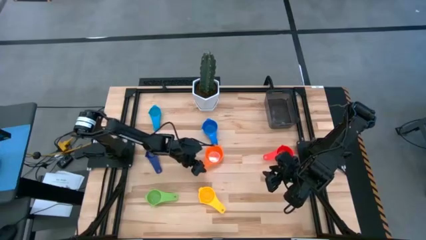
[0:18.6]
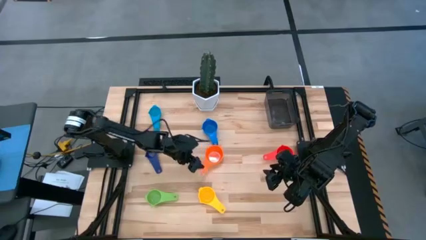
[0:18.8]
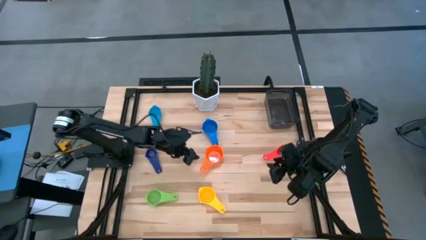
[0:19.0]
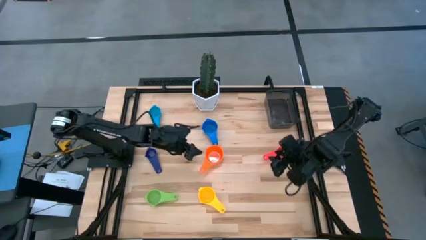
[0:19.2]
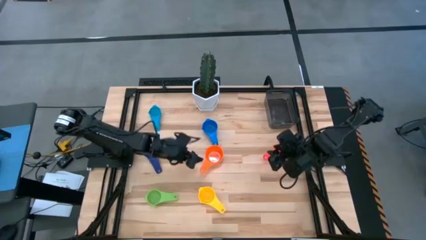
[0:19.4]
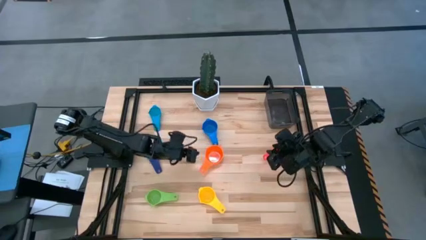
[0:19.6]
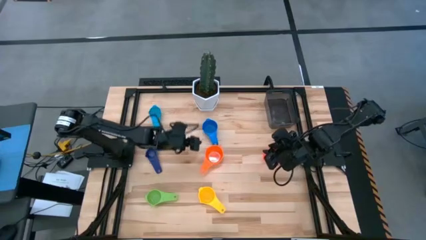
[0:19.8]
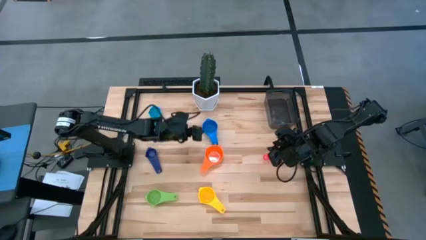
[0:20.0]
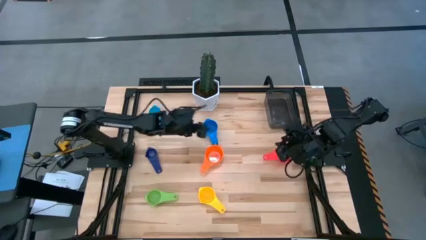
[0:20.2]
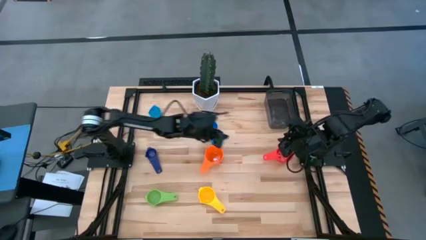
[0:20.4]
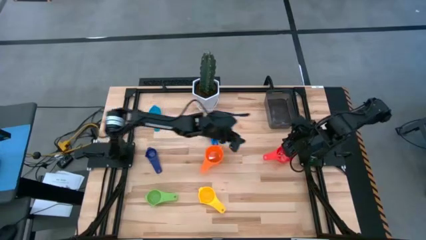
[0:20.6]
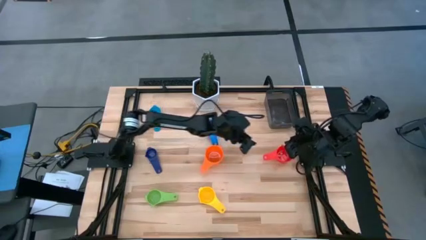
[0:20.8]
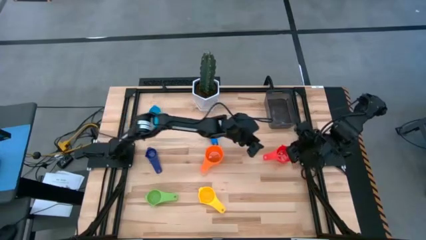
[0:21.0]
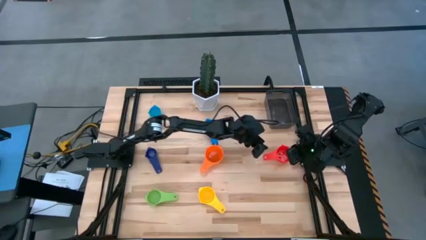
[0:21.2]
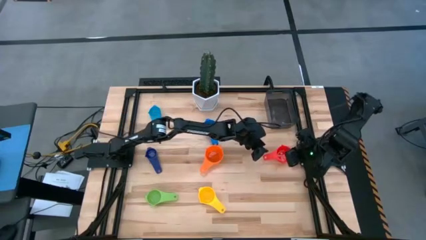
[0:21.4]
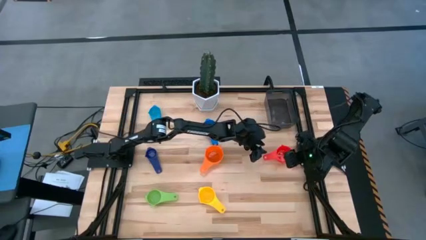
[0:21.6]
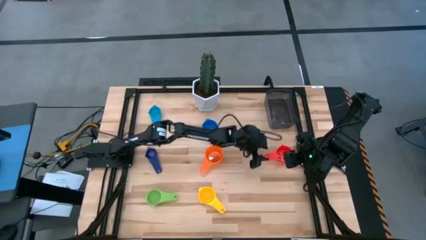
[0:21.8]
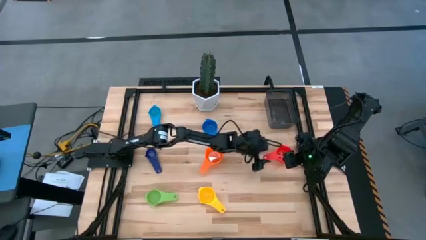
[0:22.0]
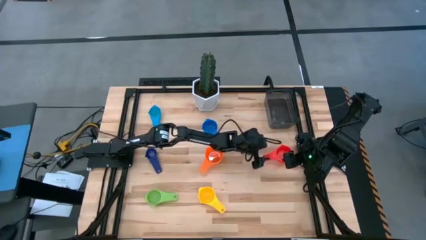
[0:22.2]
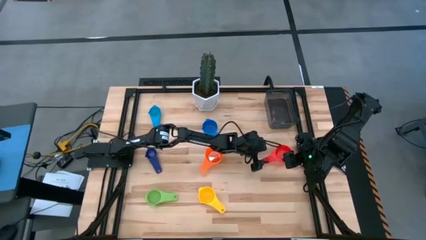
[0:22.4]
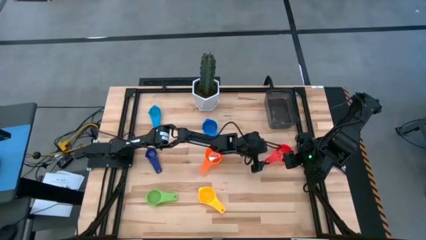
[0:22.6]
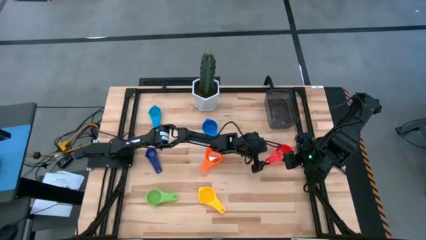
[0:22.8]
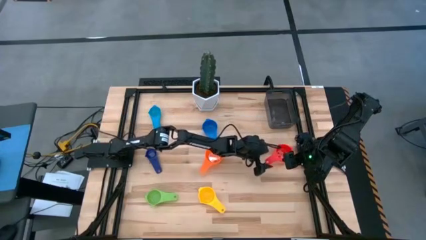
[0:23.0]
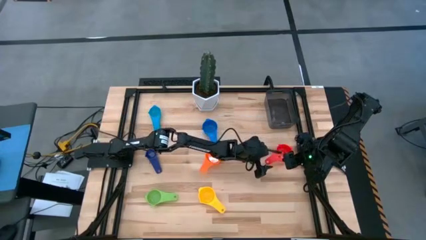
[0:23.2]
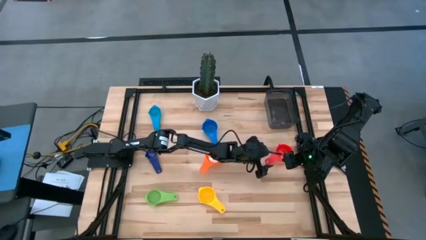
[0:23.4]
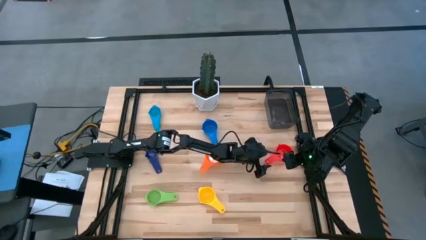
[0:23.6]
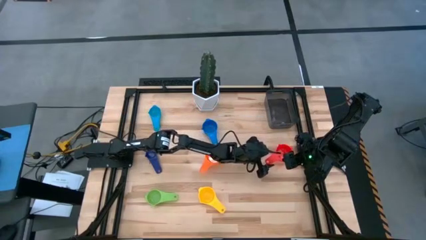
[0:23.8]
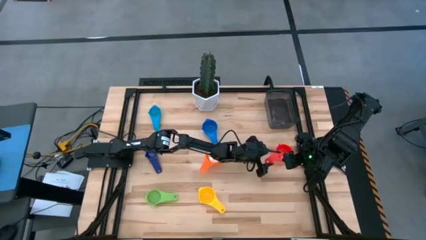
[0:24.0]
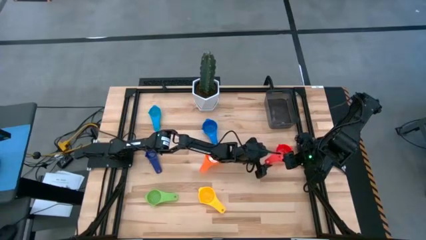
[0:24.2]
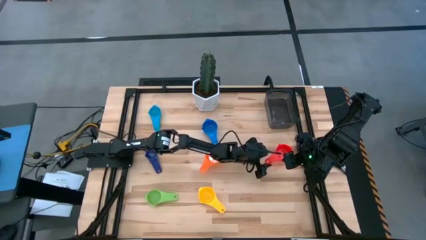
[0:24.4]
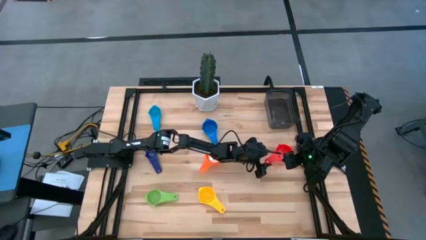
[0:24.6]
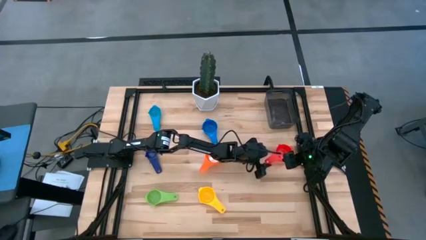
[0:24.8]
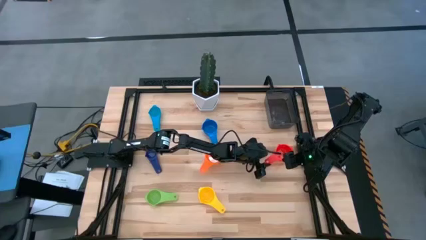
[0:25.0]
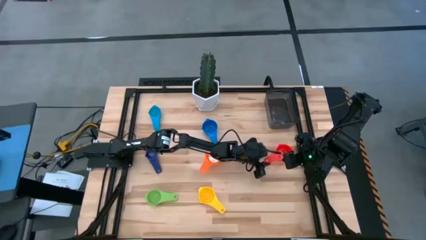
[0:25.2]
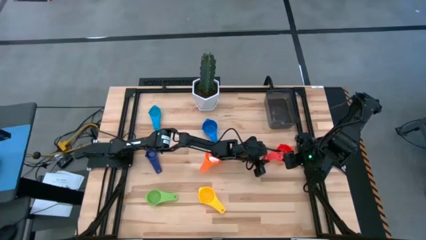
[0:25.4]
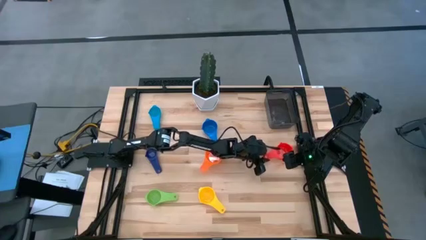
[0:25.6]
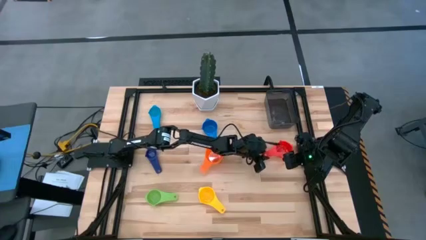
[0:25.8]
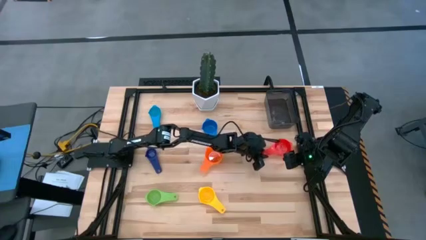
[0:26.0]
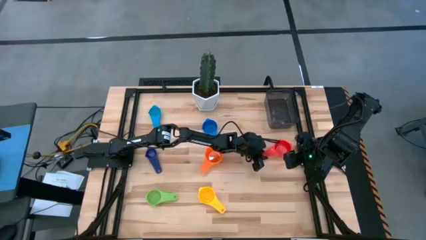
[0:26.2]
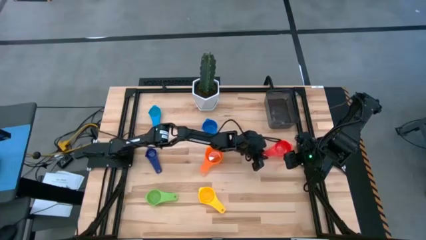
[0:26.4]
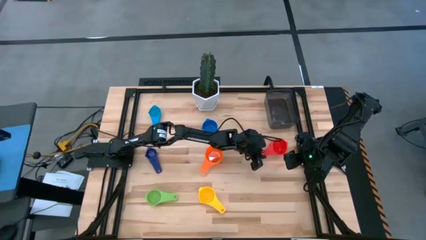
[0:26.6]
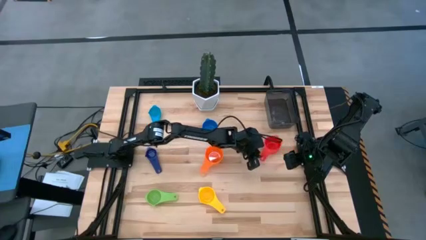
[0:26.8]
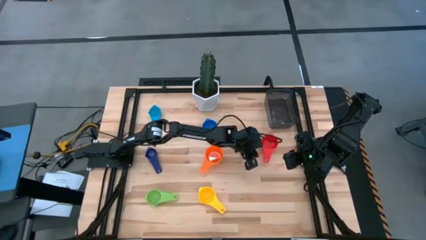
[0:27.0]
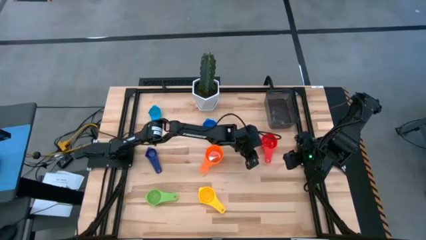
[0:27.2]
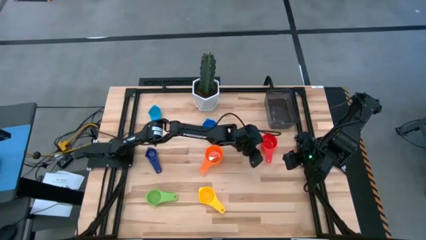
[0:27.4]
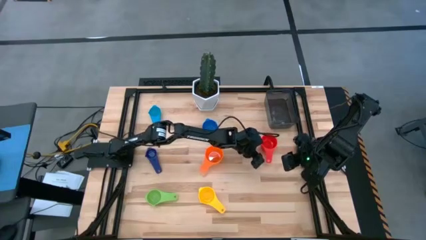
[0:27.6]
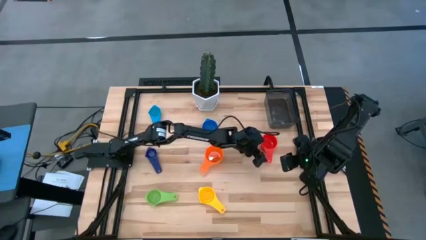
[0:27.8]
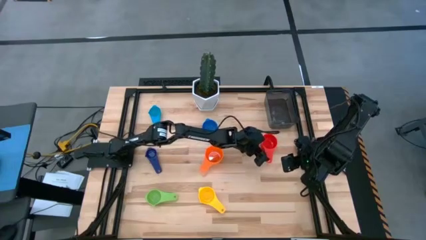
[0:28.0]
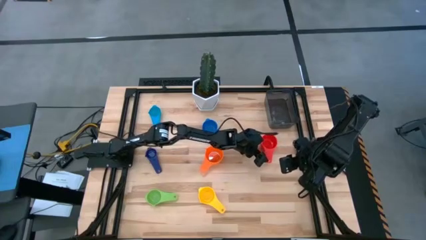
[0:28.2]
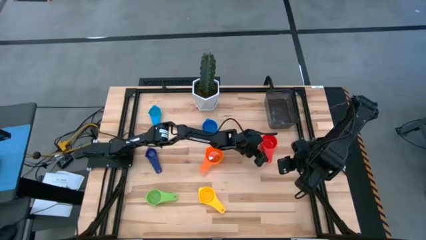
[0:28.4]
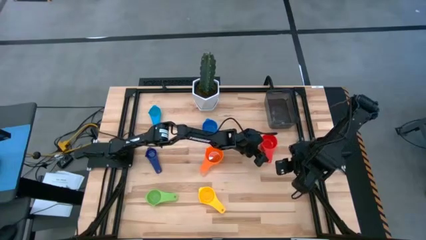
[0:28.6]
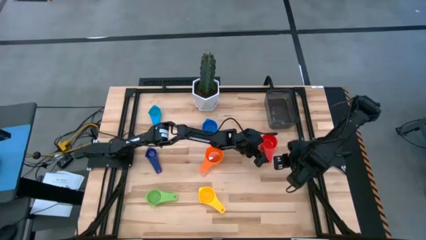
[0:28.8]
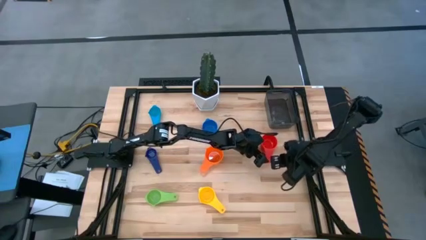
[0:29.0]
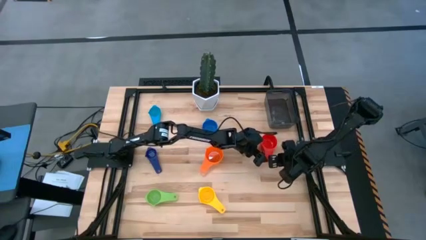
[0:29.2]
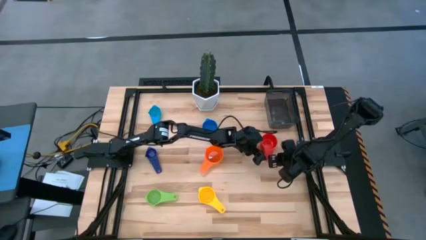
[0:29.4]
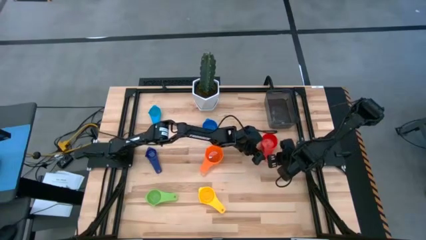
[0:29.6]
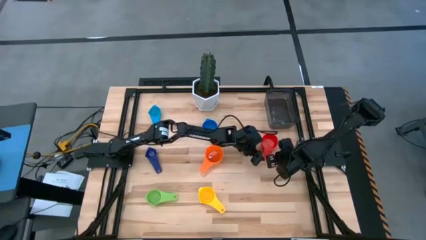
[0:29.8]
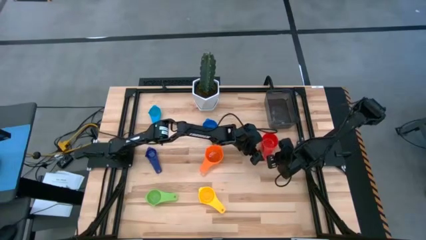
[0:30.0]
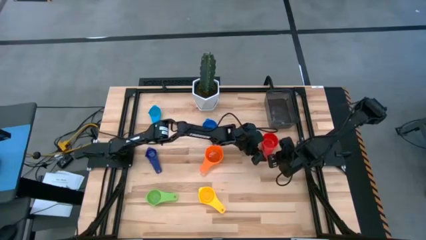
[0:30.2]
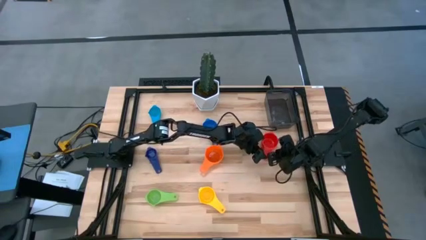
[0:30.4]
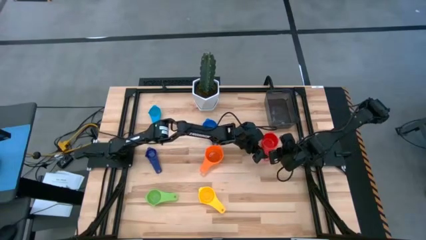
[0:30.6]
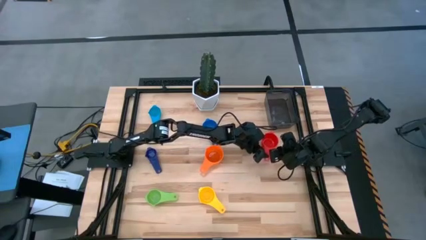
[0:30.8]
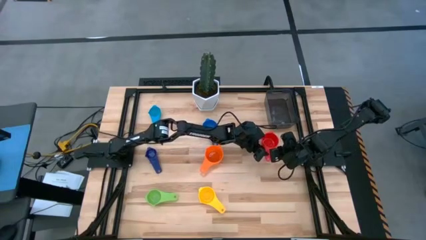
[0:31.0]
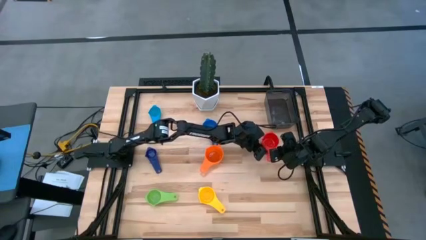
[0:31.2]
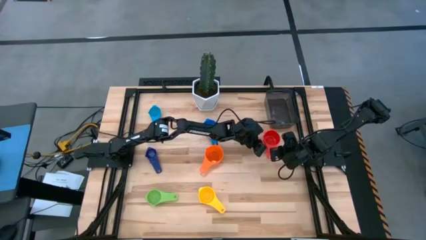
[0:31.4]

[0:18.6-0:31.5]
Task: Nest measuring cups in basket
Stack the red measuring cup on top of the orange measuring cup
